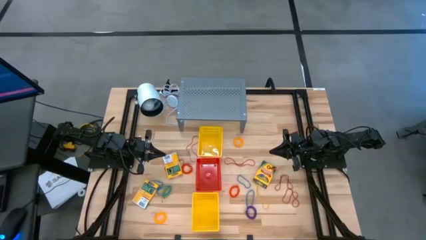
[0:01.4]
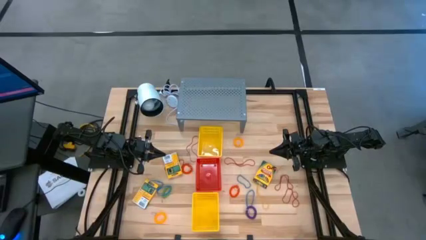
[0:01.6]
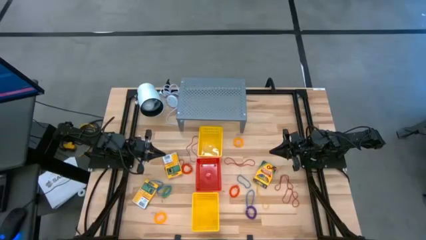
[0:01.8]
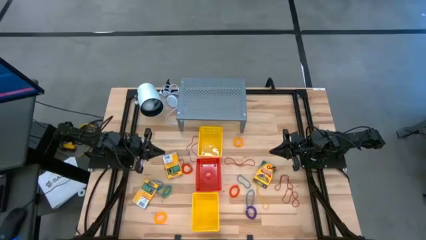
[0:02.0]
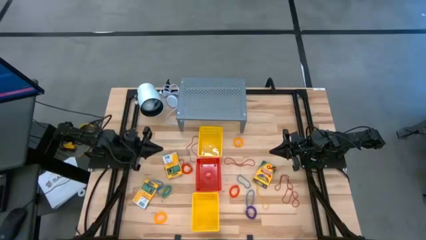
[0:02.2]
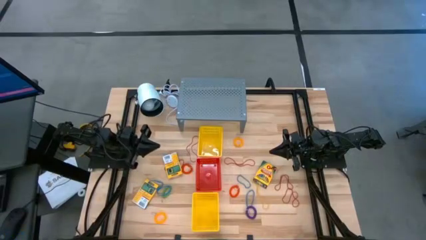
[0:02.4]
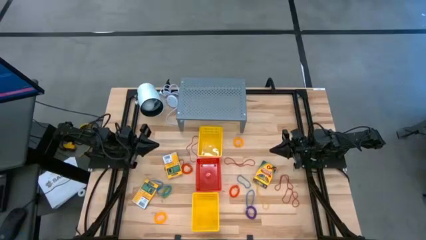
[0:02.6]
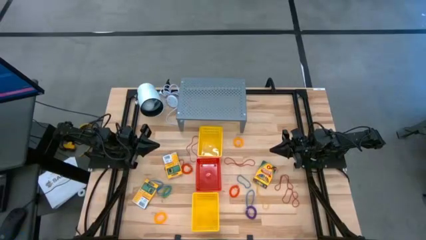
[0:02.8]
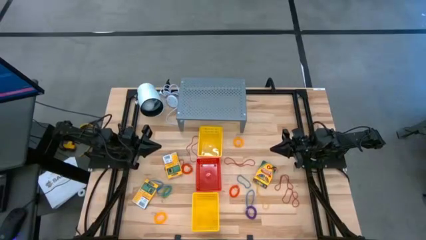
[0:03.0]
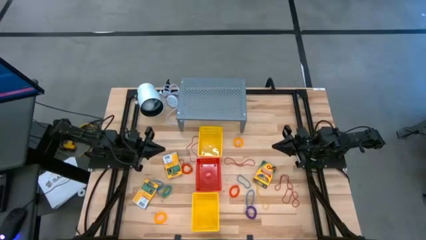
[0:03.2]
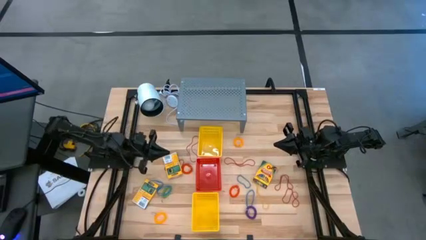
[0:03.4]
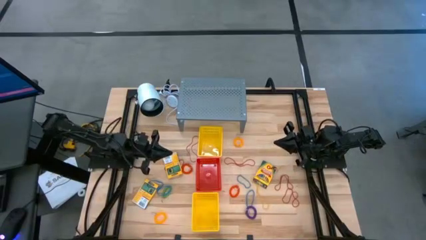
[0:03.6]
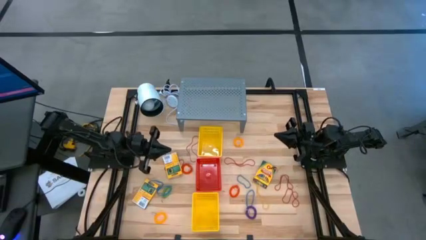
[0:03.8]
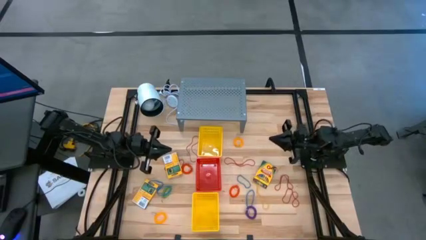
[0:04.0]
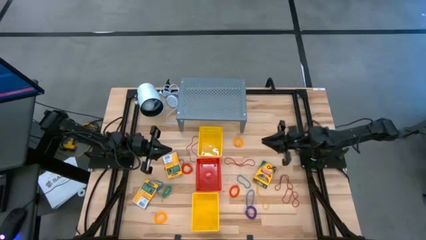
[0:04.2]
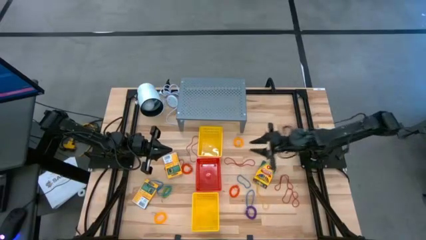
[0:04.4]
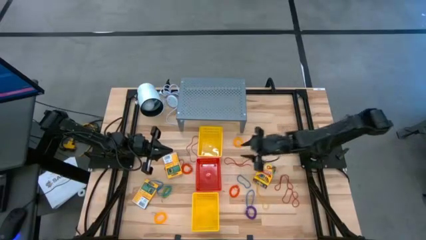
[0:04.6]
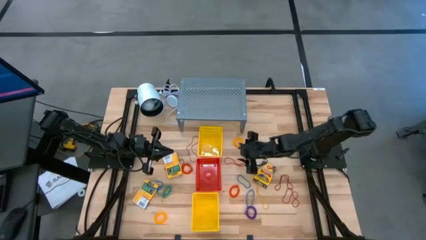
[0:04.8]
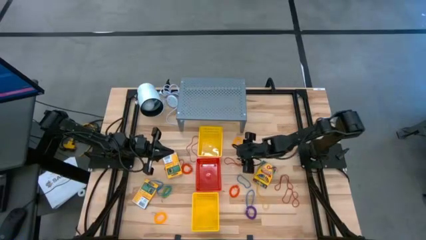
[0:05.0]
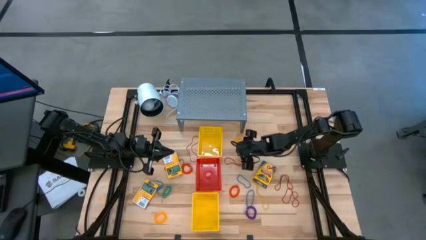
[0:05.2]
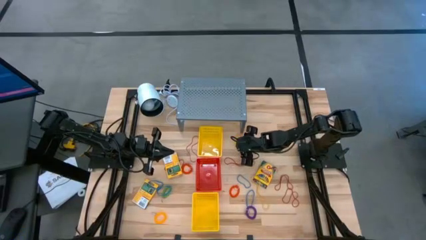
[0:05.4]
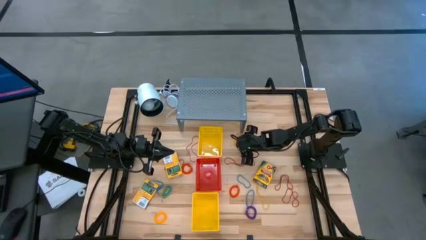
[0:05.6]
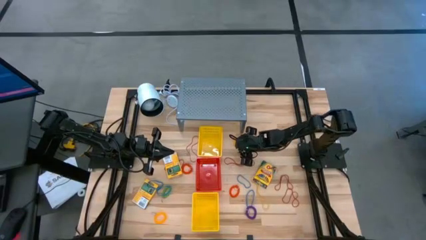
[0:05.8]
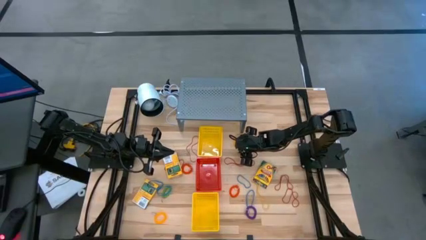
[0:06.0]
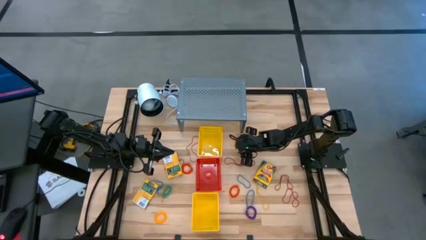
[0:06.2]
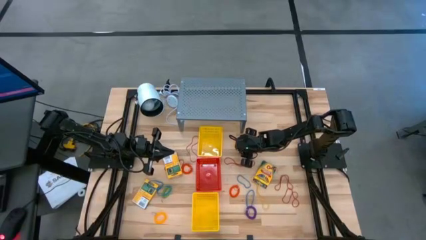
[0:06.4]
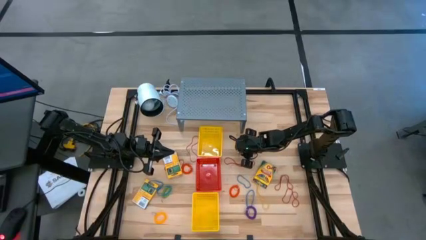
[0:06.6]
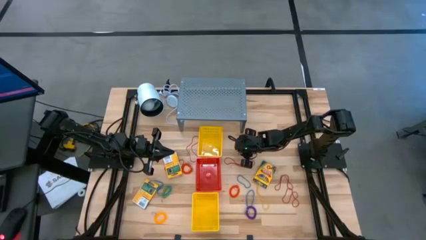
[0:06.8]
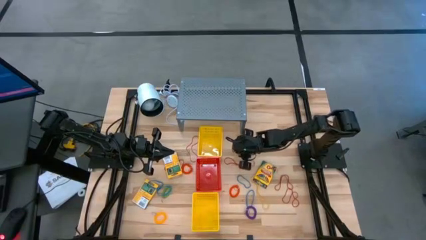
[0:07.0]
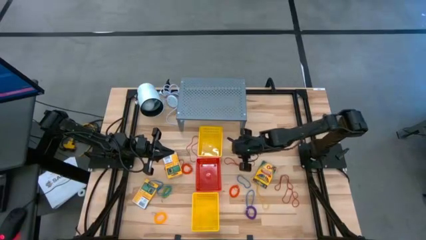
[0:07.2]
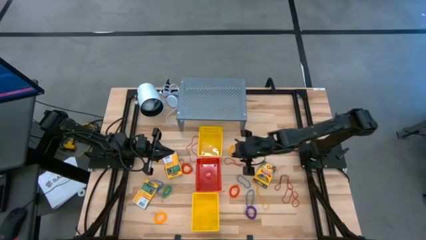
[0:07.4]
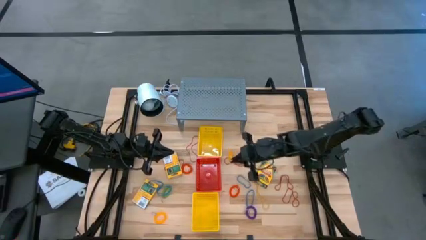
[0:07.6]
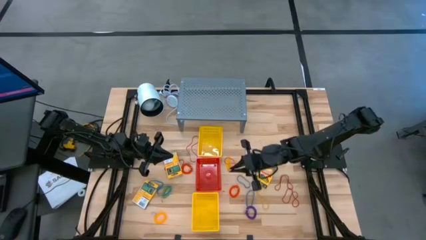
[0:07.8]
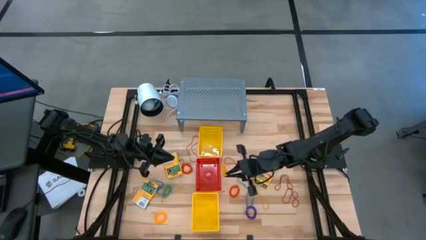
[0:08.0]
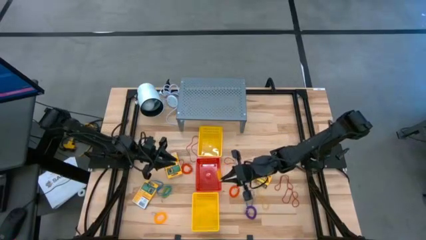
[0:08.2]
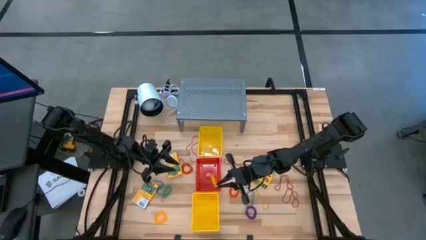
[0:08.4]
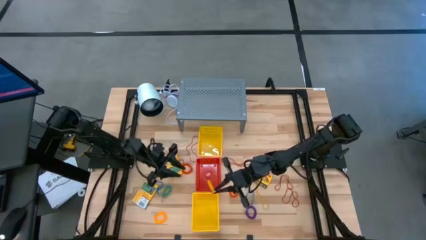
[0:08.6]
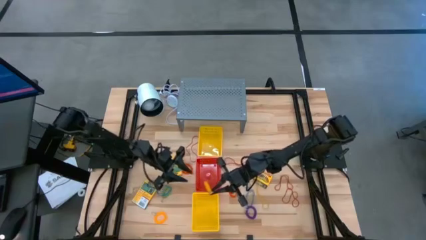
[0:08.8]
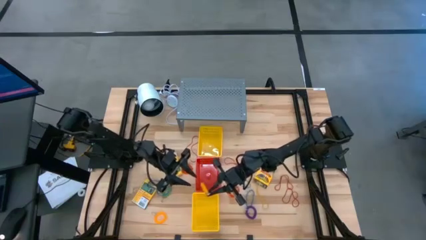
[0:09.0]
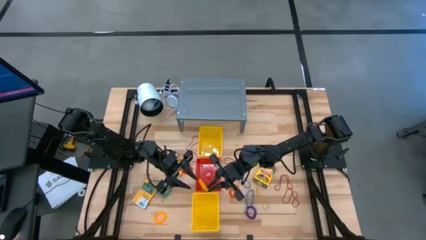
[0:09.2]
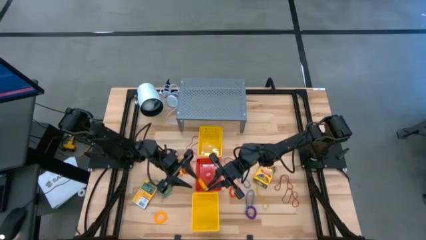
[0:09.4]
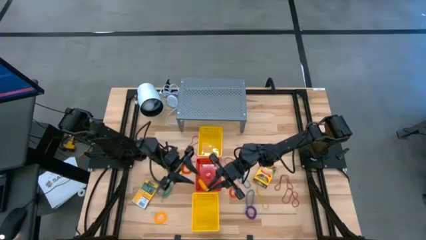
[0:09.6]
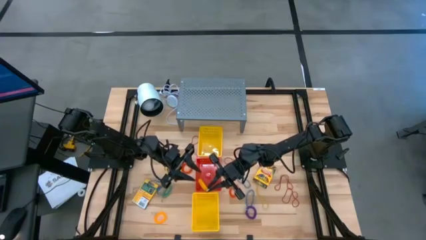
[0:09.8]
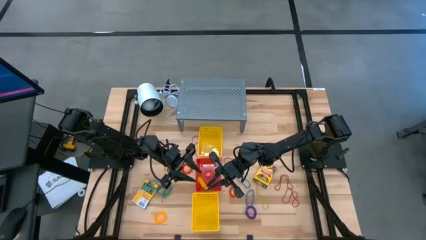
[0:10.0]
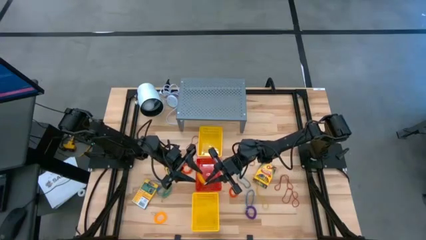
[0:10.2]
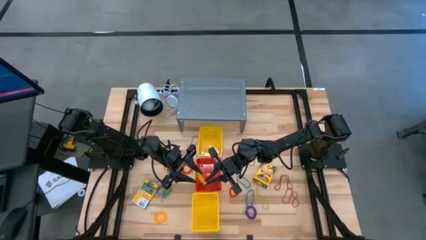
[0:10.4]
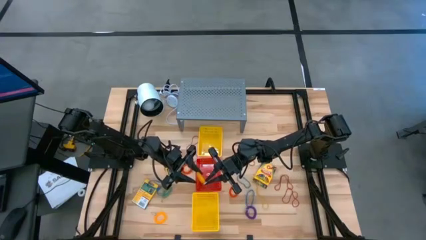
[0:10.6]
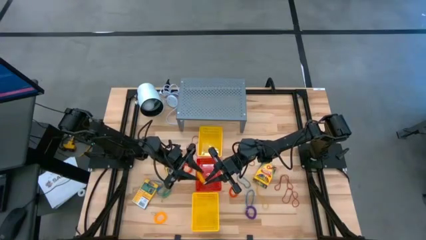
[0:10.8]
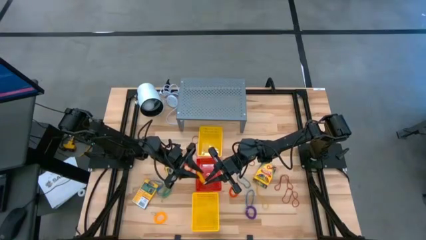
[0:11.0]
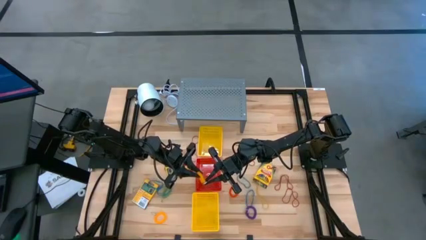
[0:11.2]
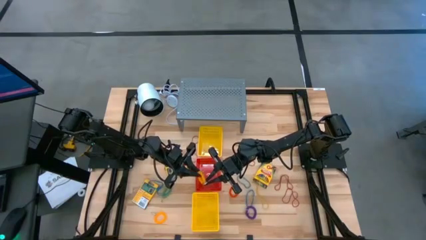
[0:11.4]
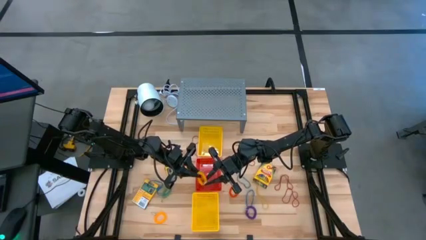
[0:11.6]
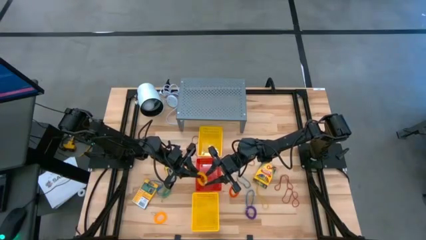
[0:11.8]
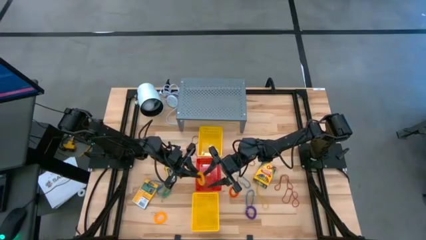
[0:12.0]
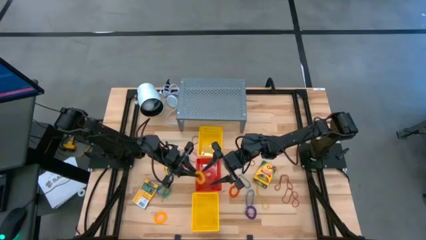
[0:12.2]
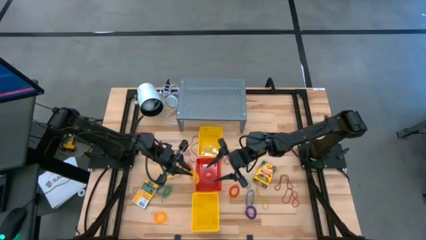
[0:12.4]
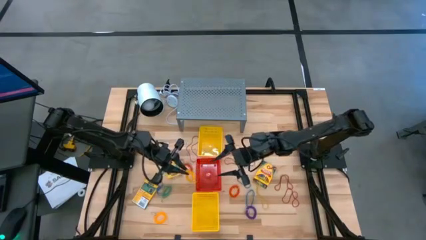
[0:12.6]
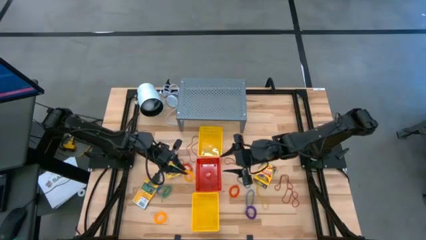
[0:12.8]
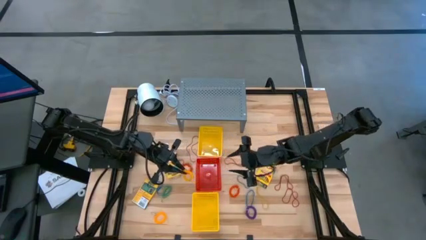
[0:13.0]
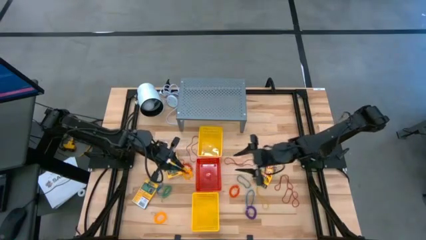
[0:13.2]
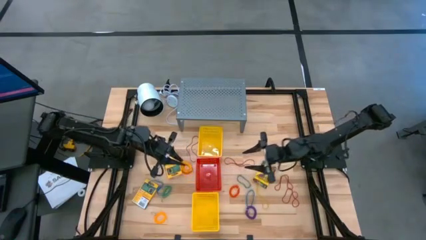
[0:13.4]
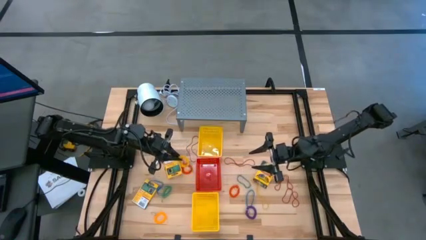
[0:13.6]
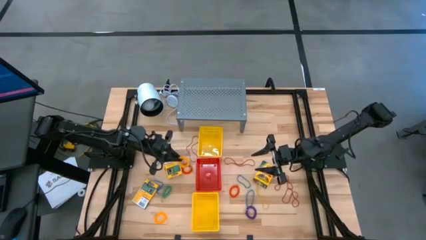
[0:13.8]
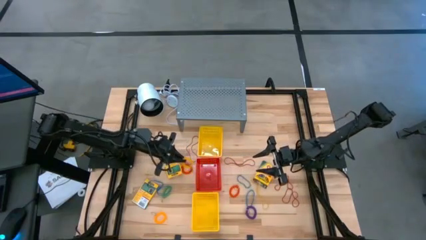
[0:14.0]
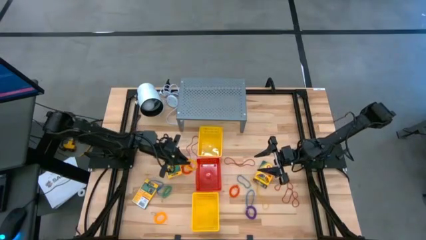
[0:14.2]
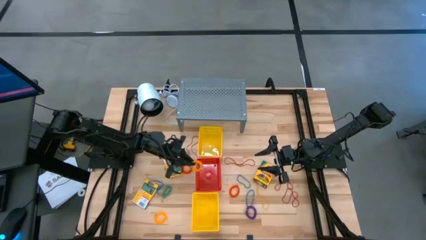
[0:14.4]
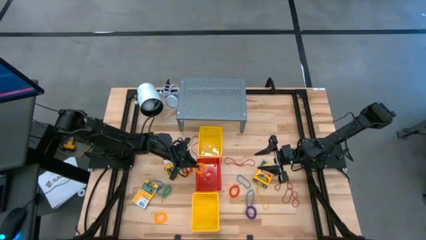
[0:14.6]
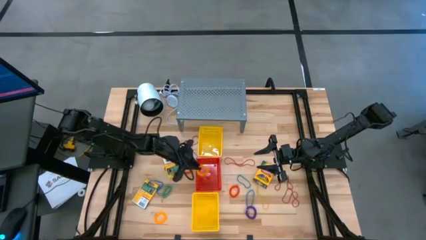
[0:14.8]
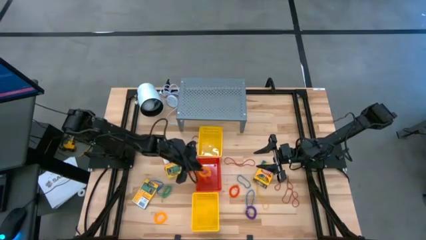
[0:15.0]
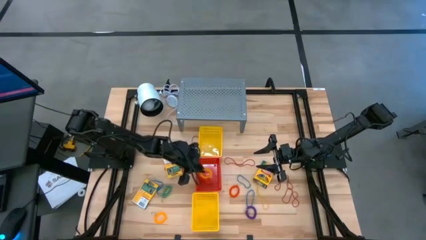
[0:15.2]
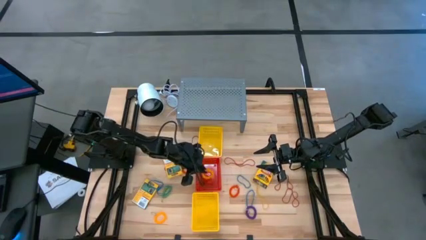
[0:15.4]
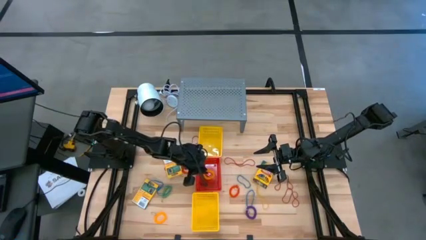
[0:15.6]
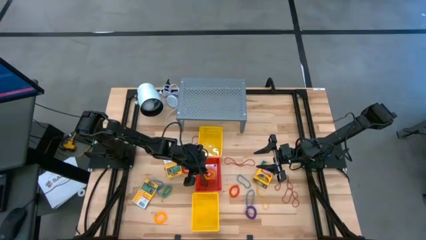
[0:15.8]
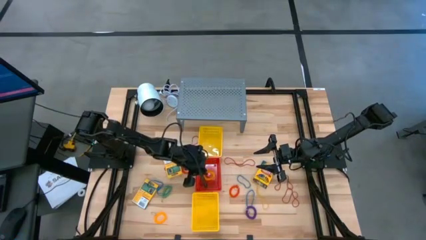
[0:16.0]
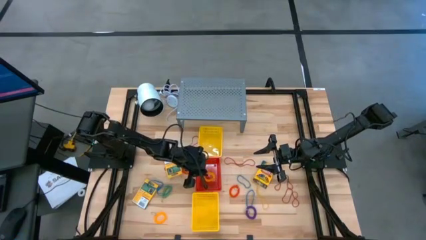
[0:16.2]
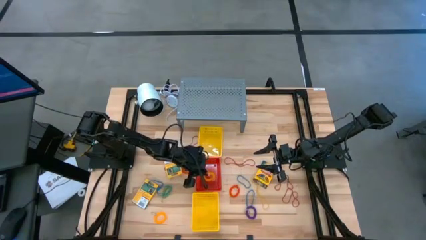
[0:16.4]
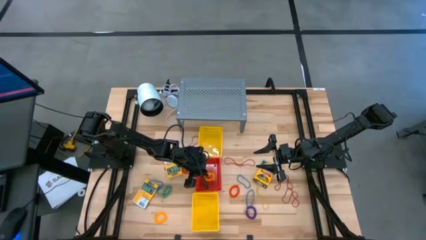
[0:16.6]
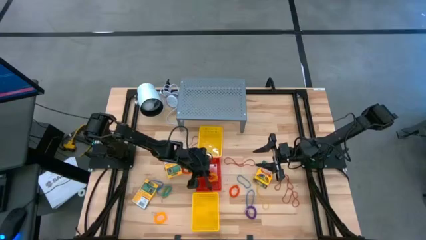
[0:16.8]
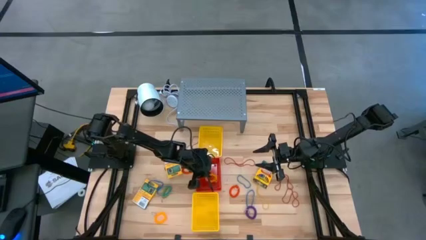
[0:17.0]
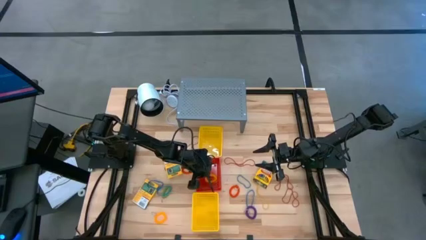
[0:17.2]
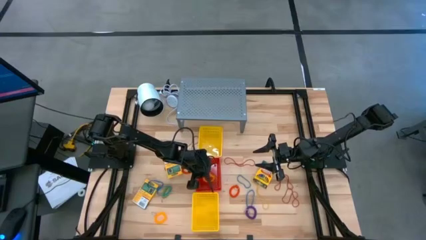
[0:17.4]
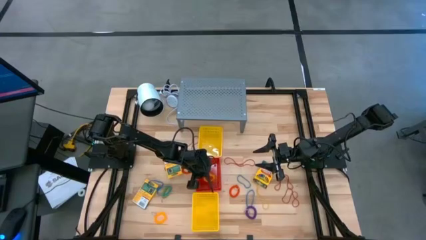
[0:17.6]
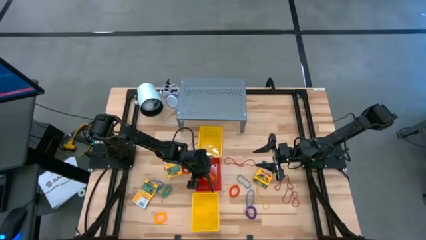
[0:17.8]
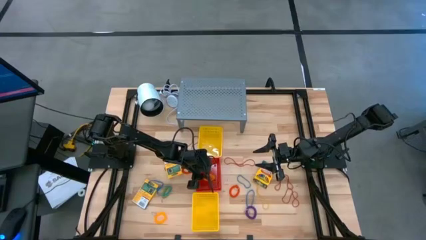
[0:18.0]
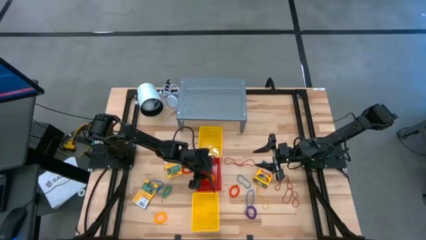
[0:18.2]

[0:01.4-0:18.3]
Task: Pick & Place Office Desk Supplies
Put the yellow spring rubber band into the red bin
